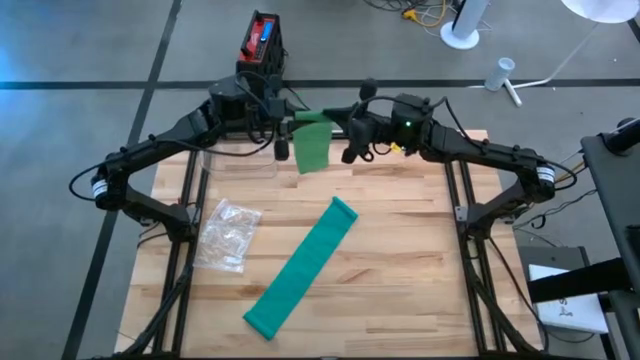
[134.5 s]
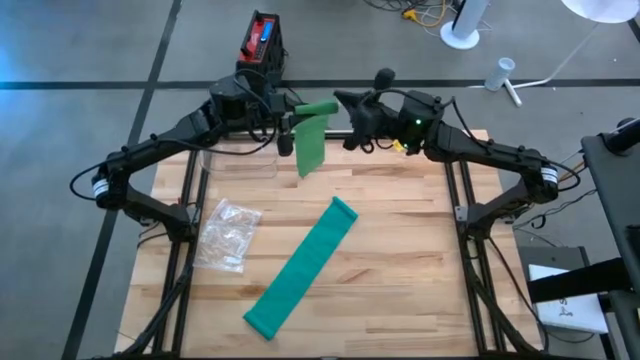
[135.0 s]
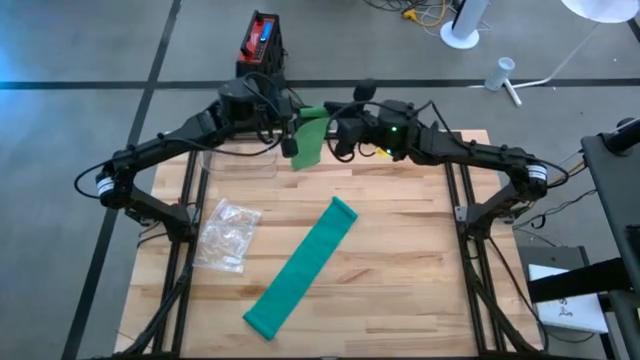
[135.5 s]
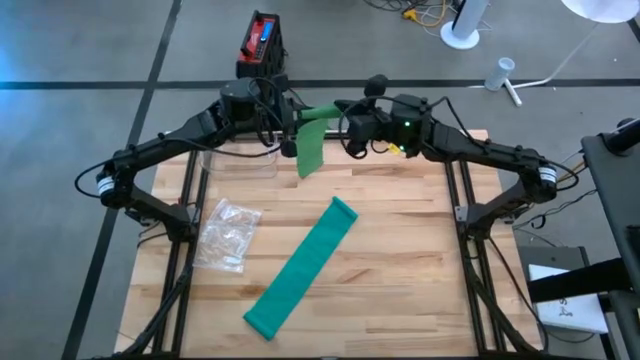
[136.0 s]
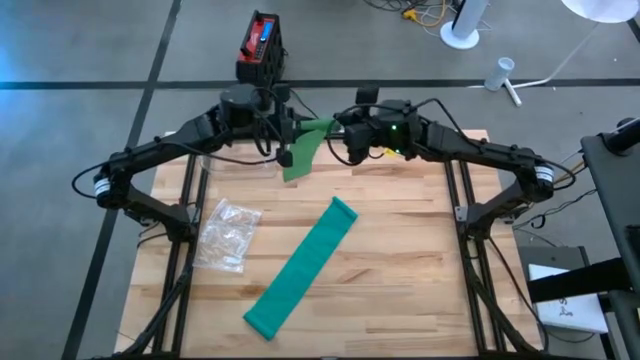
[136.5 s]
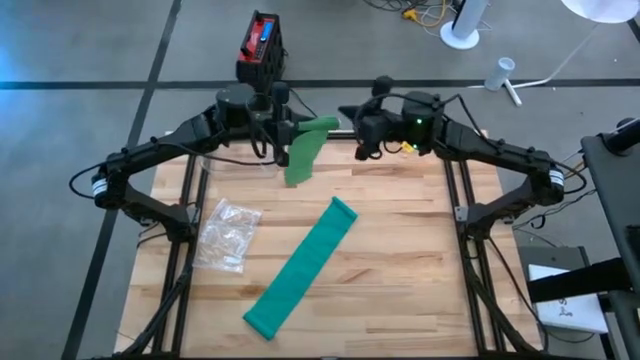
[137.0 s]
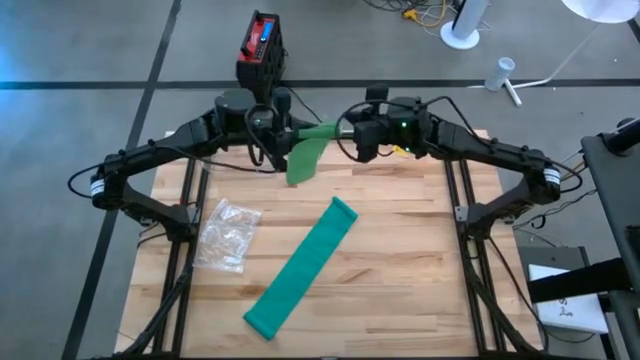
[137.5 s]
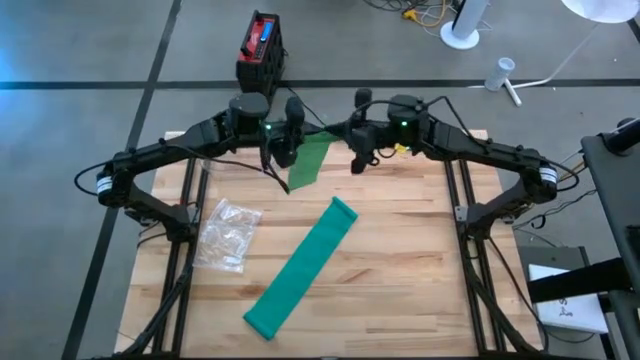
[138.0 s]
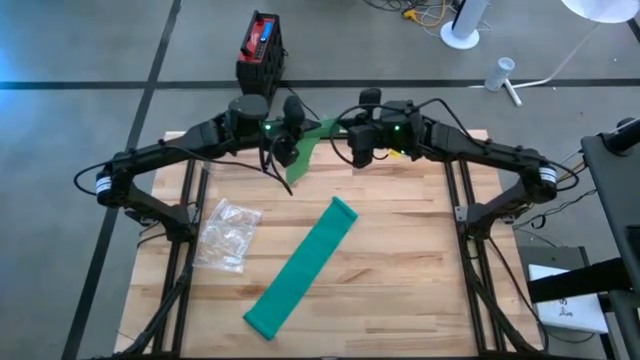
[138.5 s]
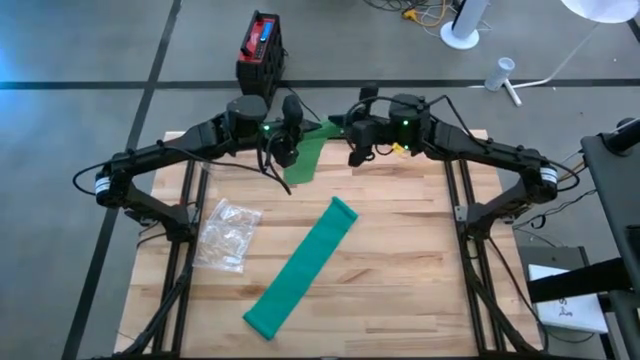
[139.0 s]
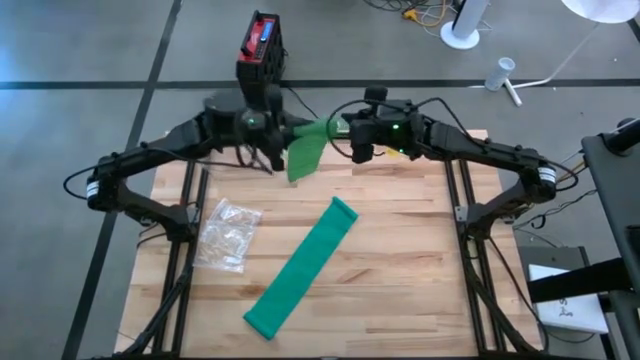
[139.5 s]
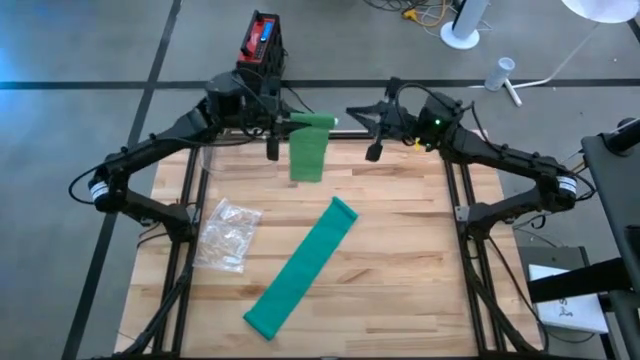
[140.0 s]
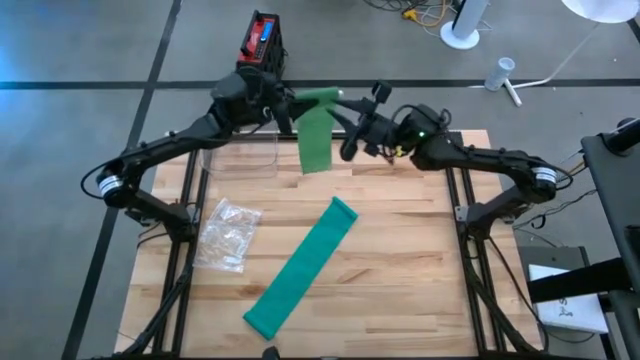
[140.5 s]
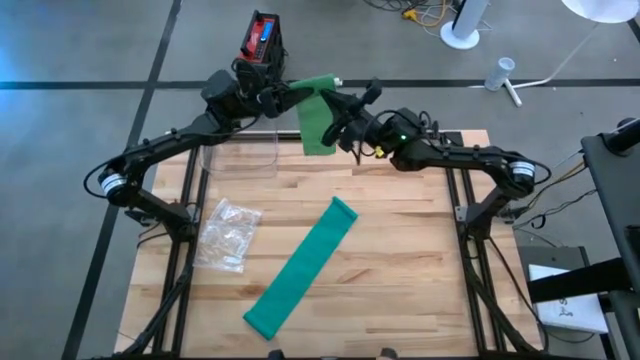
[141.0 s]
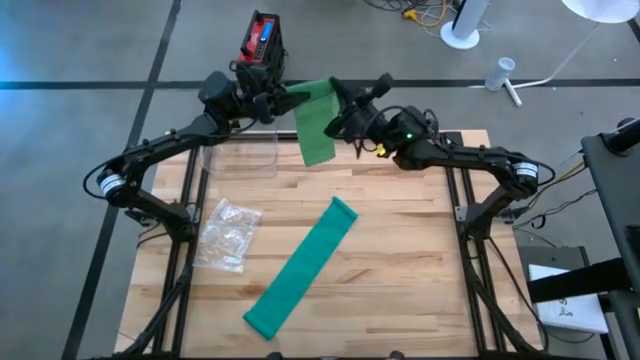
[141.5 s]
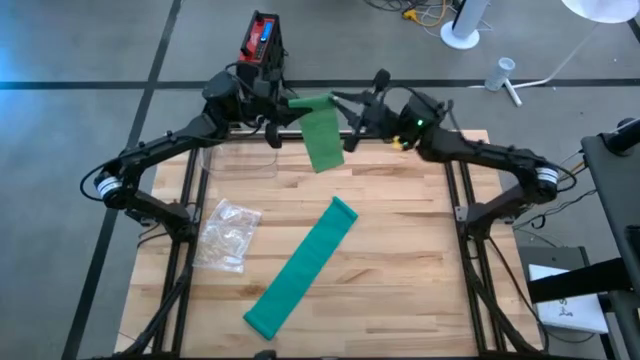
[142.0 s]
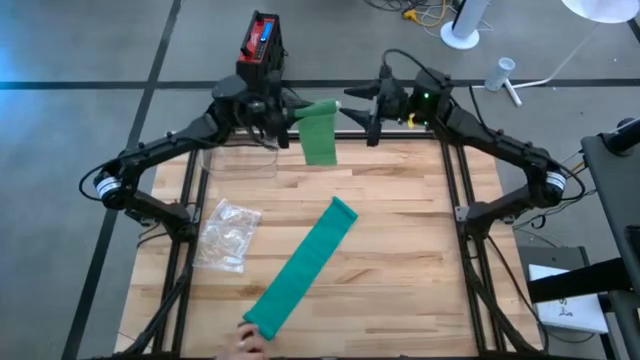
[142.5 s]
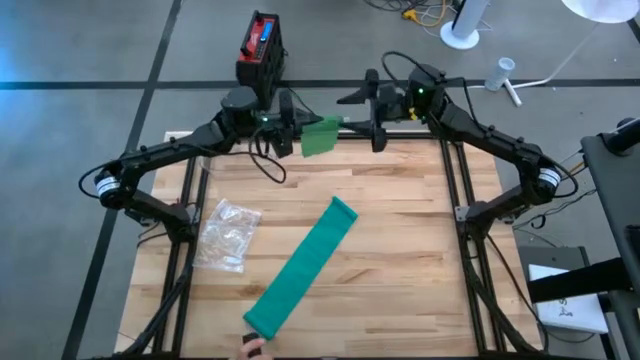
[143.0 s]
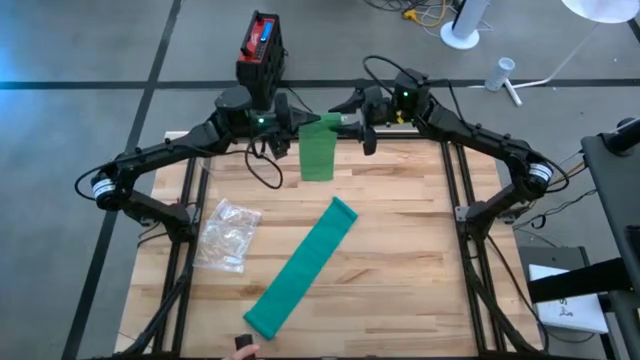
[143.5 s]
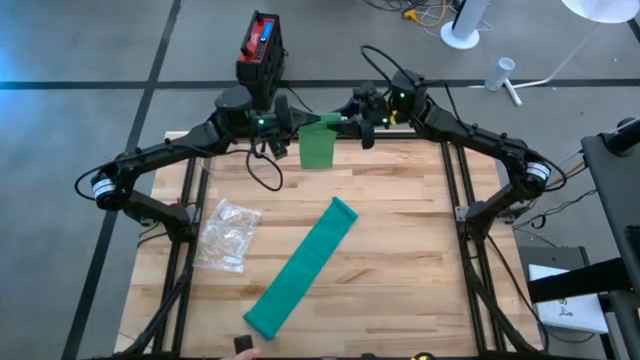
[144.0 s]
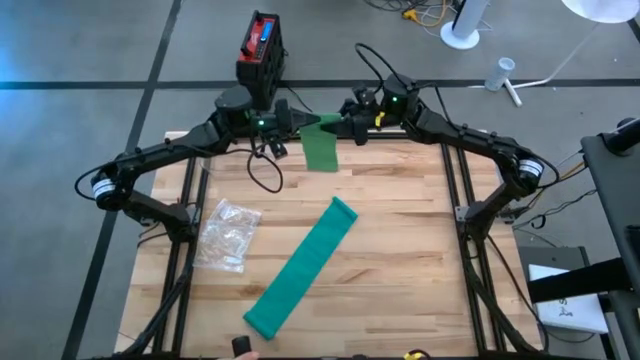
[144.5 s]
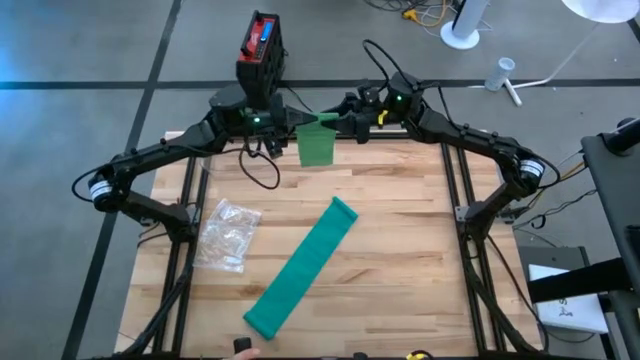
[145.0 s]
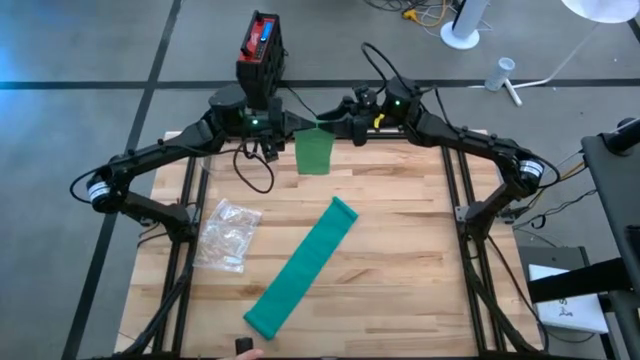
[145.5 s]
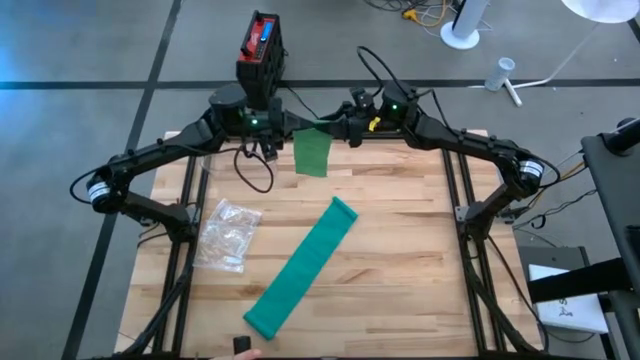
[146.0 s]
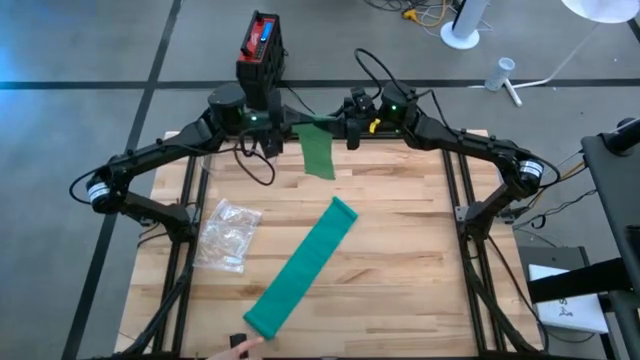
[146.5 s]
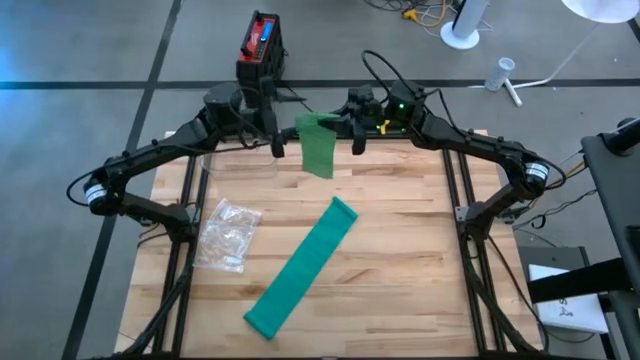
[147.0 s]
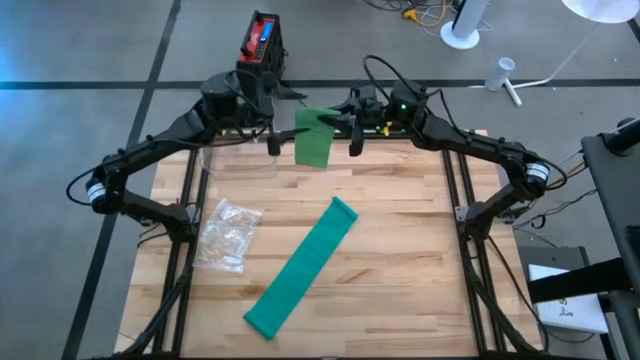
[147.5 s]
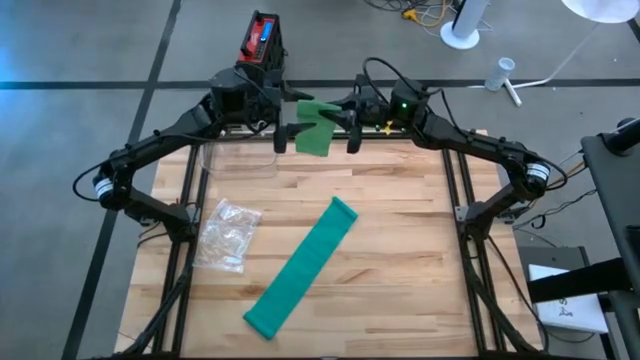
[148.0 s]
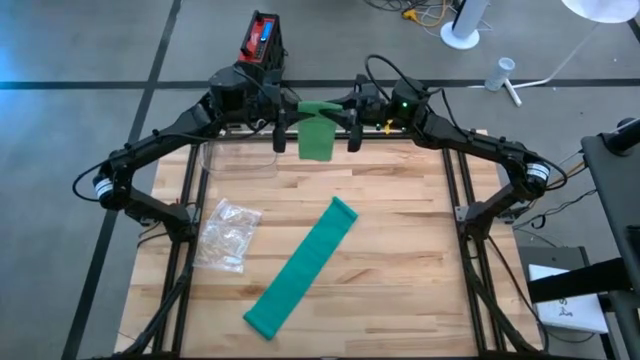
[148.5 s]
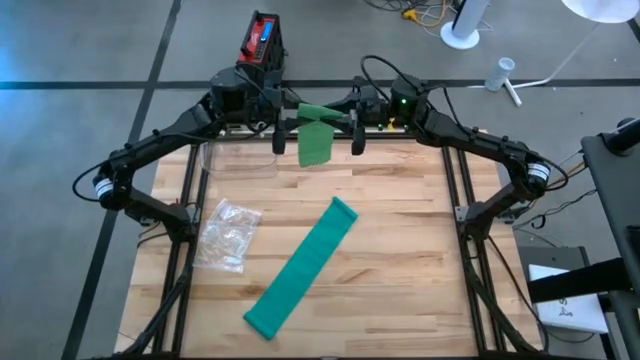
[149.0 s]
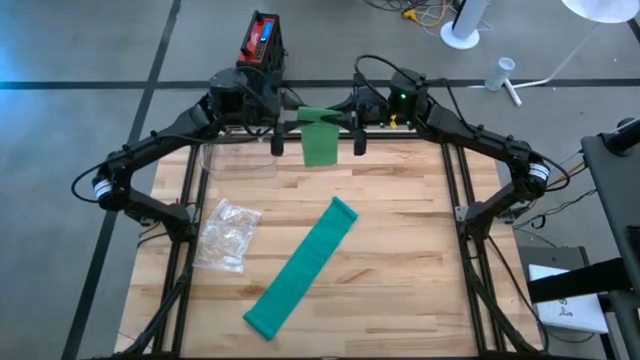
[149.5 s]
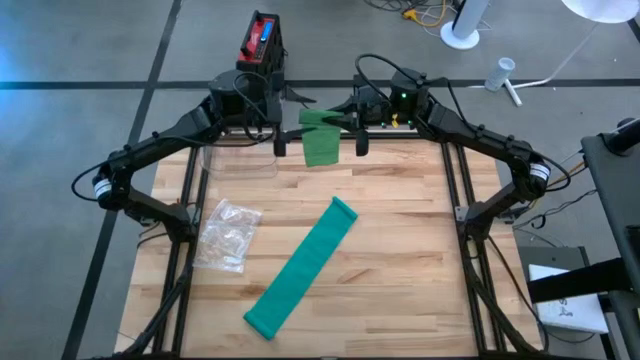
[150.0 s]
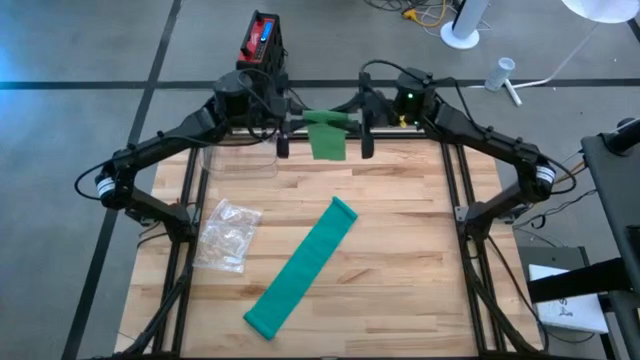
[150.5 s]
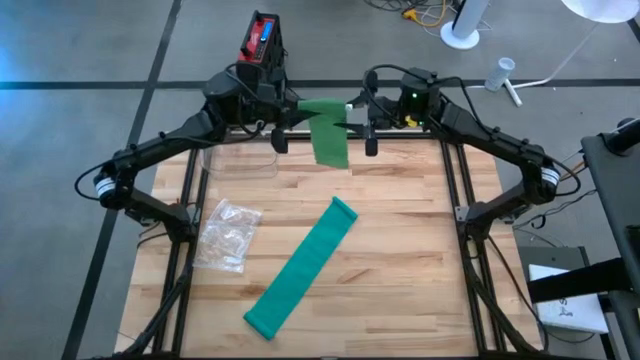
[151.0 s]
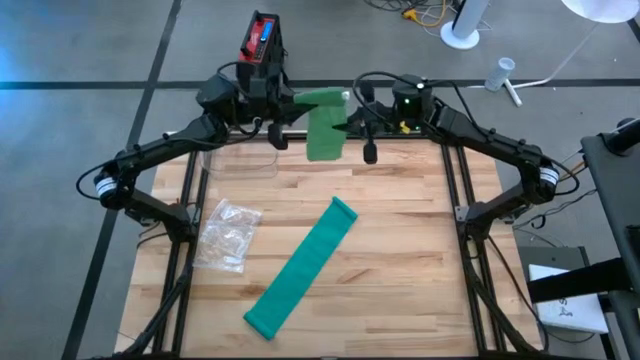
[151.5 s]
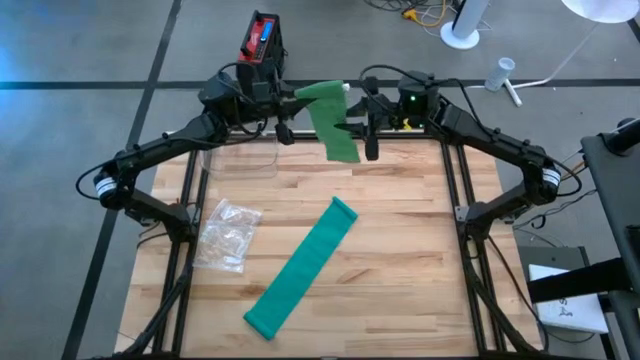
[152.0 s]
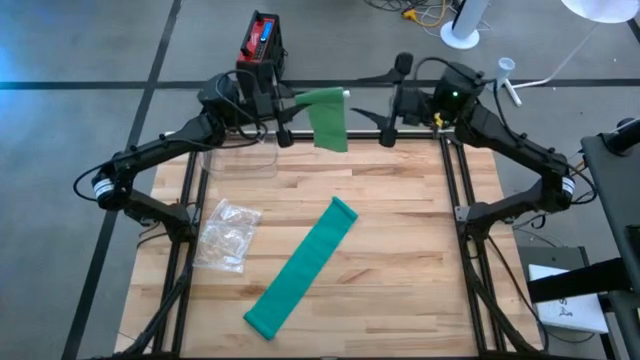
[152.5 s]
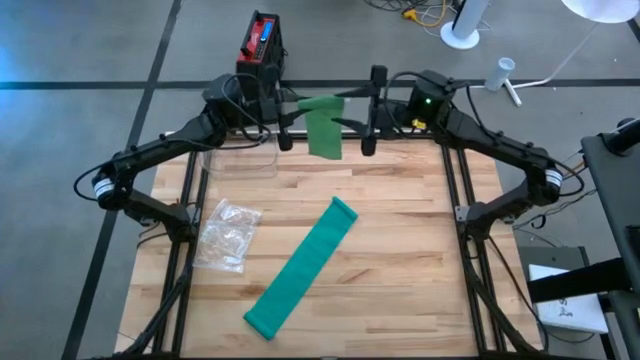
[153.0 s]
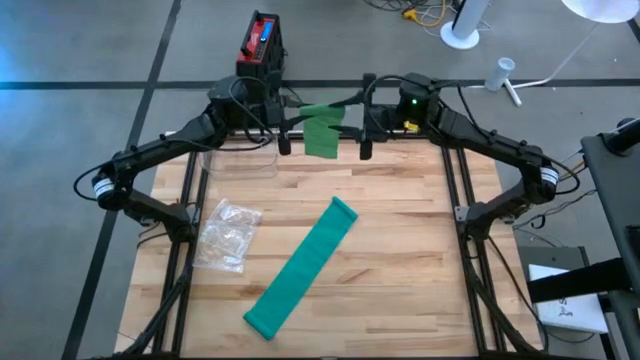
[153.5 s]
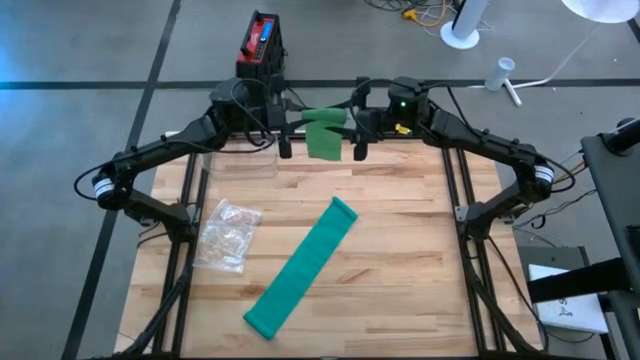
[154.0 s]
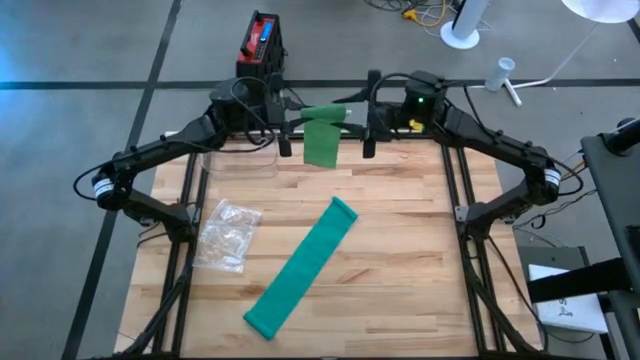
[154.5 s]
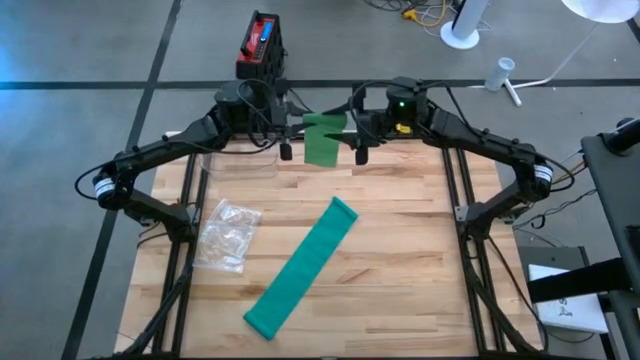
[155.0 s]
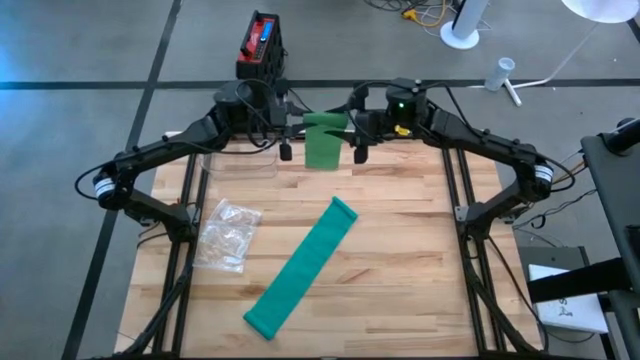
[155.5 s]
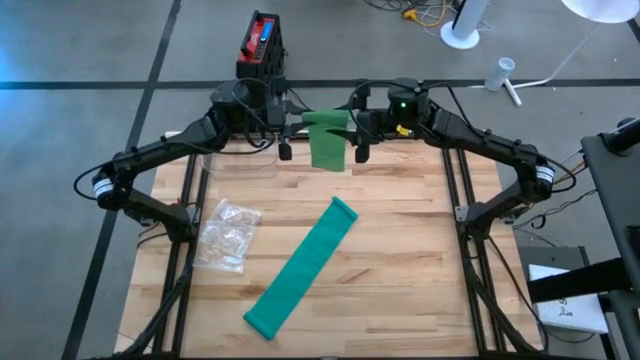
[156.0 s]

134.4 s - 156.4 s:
Task: Roll bandage
Roll the green bandage
